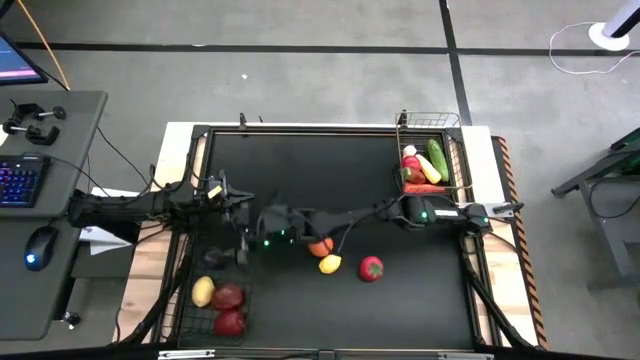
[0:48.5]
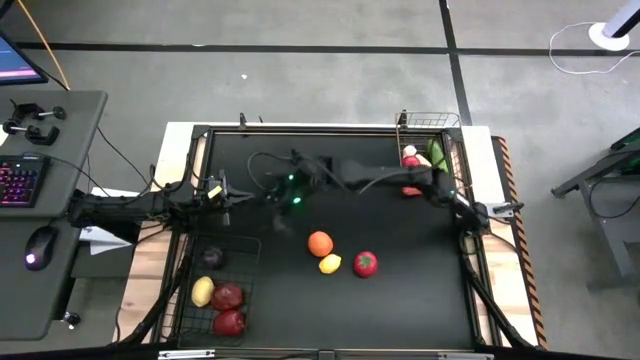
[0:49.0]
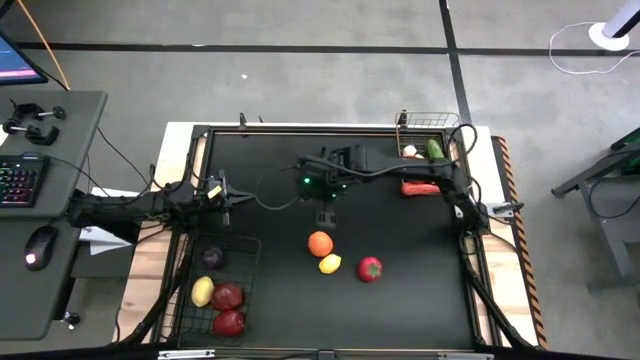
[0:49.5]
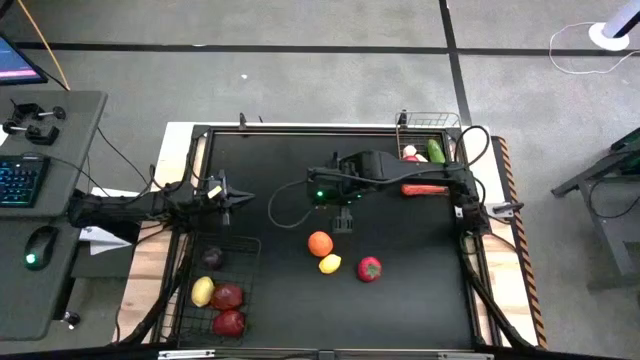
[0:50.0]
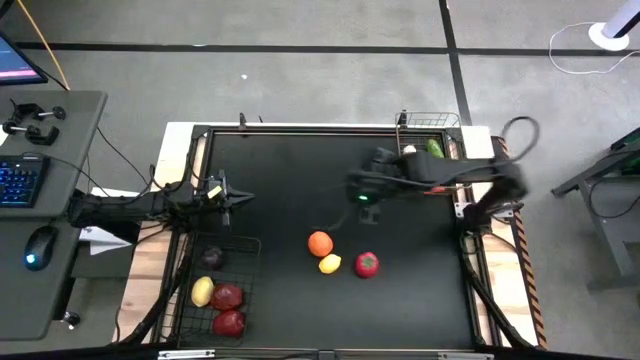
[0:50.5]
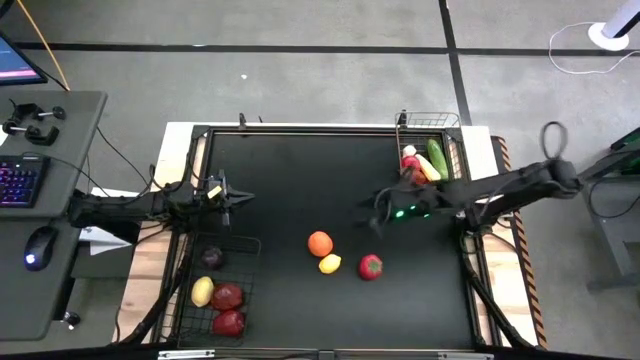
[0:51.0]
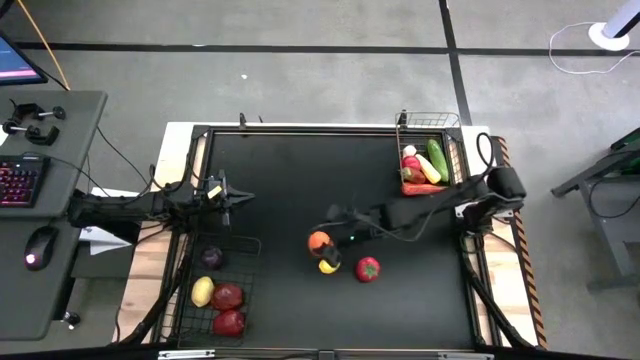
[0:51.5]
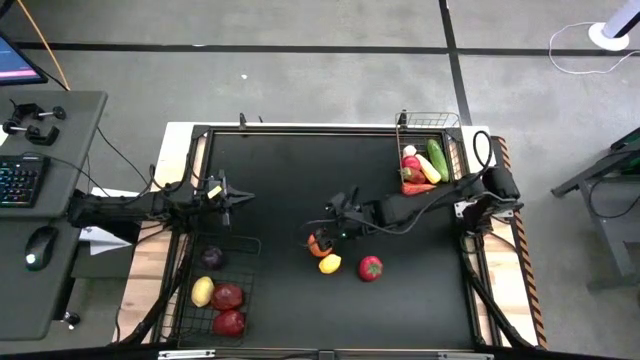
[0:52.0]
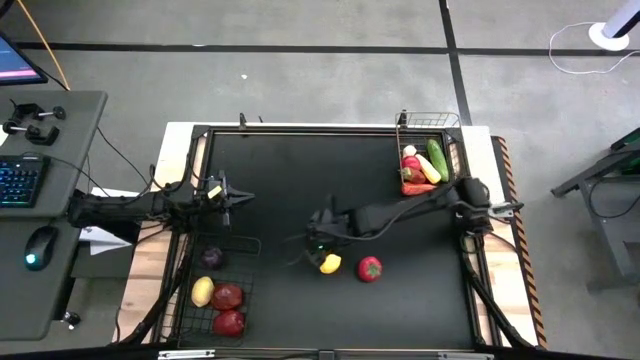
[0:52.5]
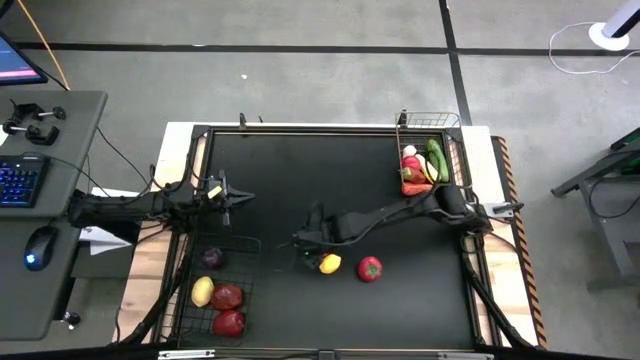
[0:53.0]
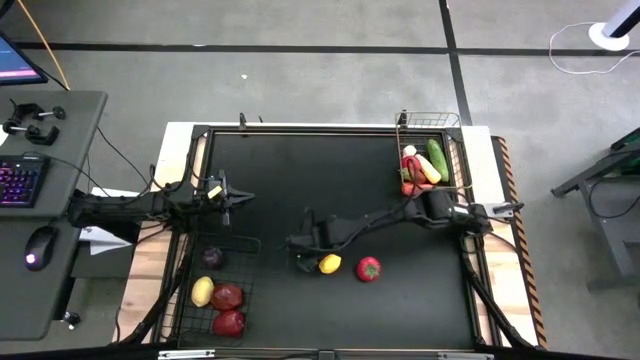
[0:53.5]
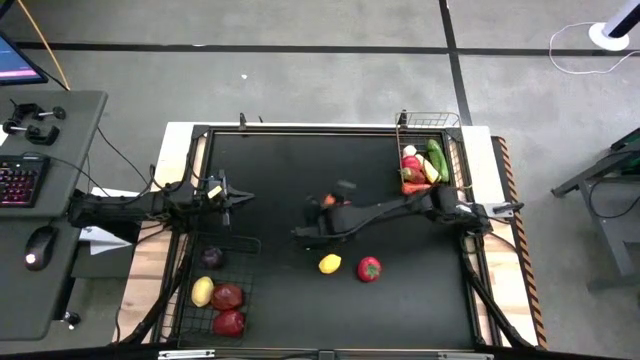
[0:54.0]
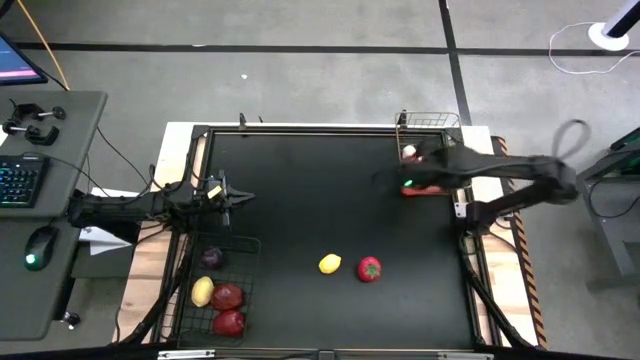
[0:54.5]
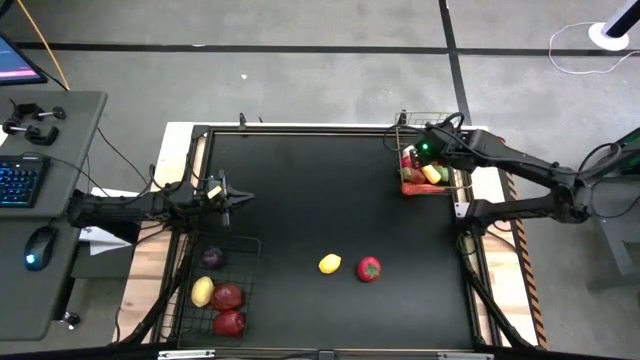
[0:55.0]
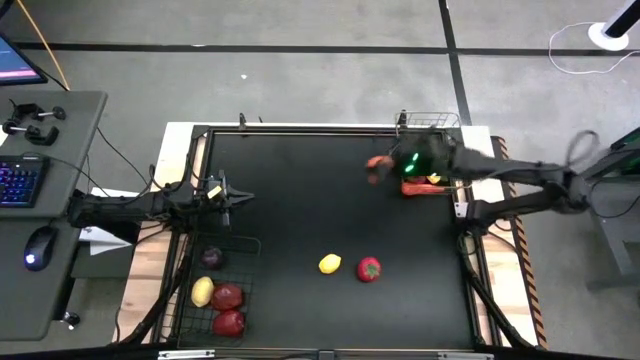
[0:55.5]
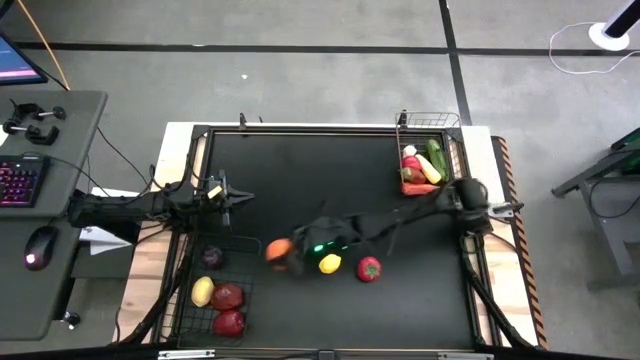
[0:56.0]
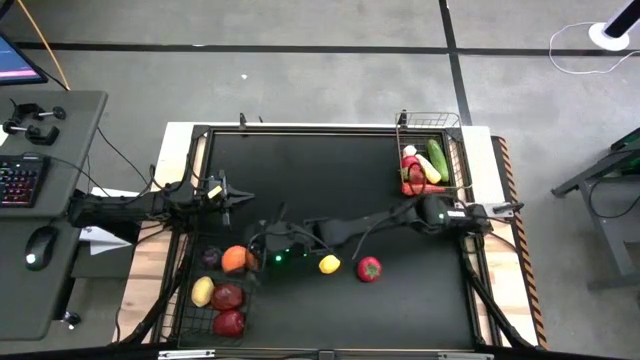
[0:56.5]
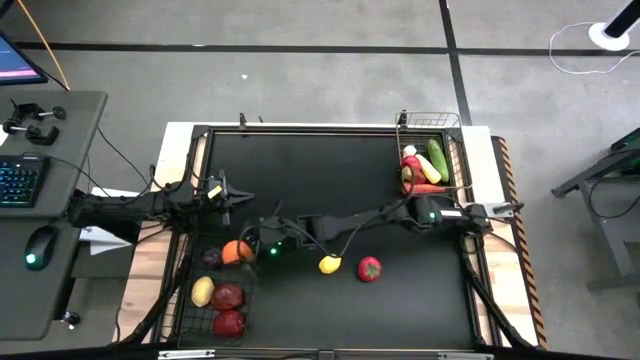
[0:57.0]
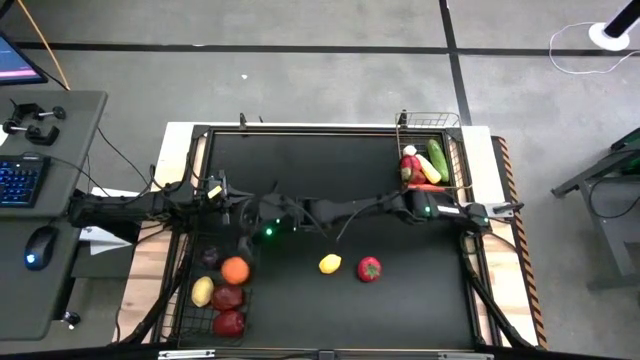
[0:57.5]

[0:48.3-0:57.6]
Task: Sort produce into baskets
Put the orange into the left wire basket

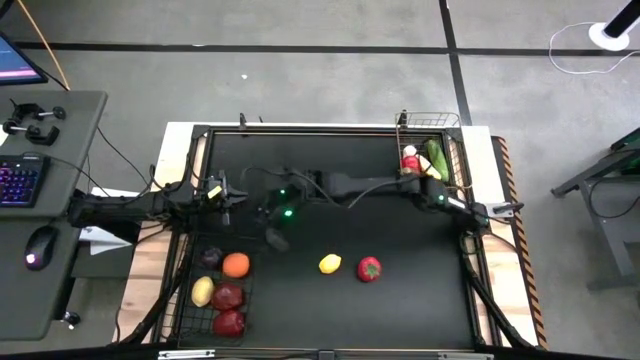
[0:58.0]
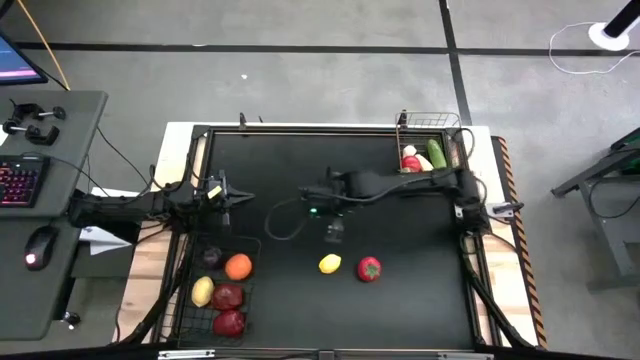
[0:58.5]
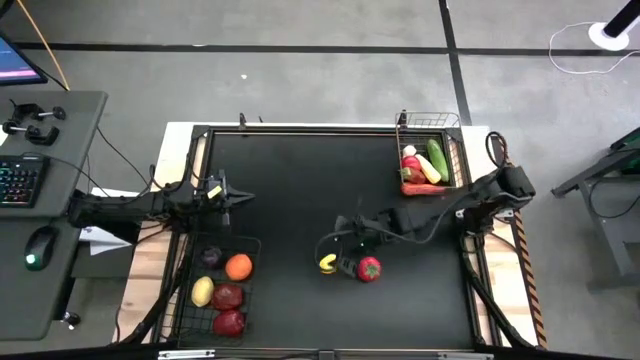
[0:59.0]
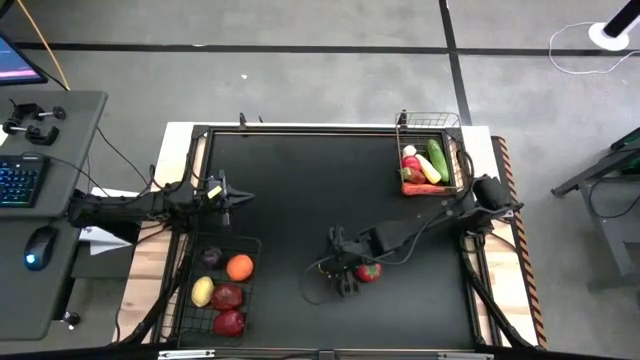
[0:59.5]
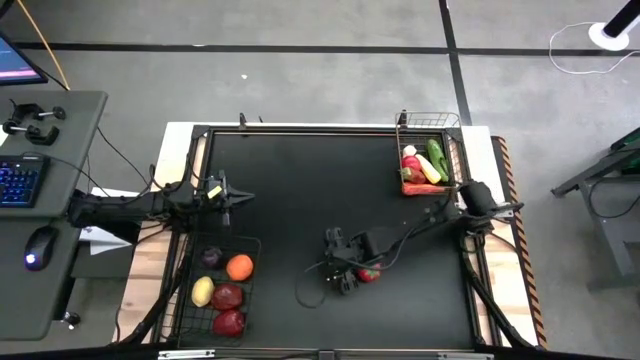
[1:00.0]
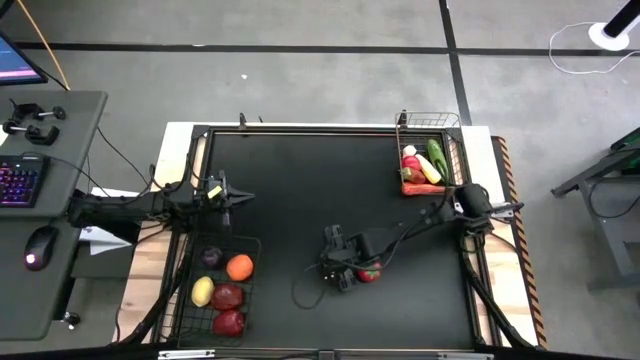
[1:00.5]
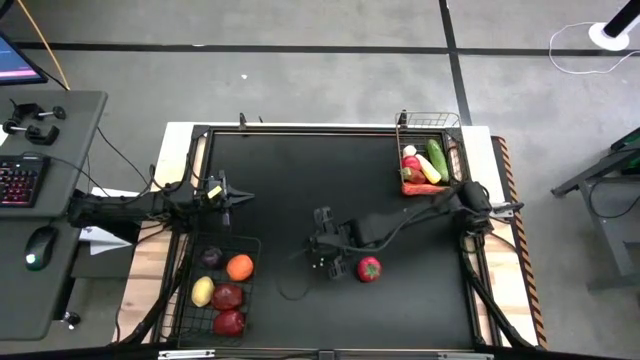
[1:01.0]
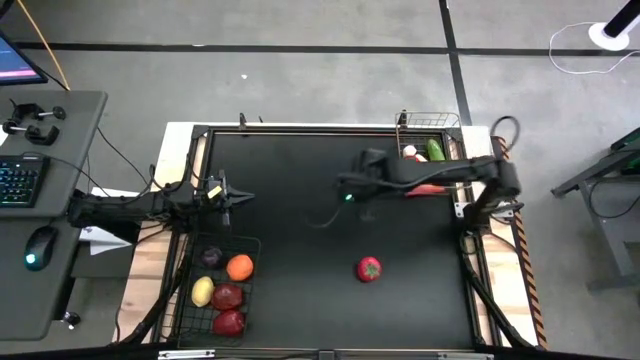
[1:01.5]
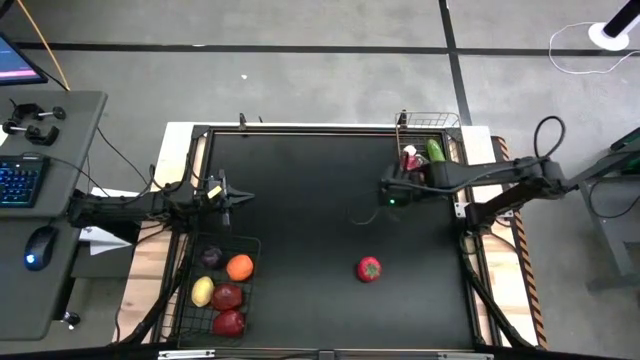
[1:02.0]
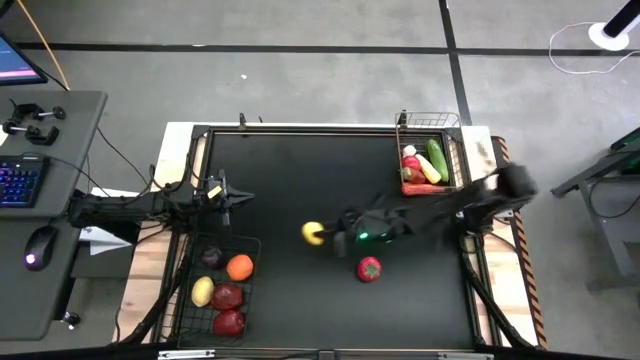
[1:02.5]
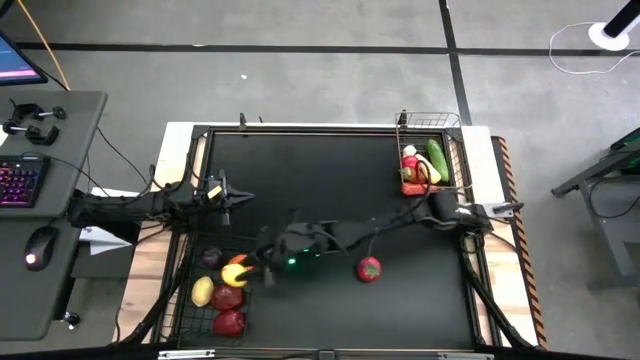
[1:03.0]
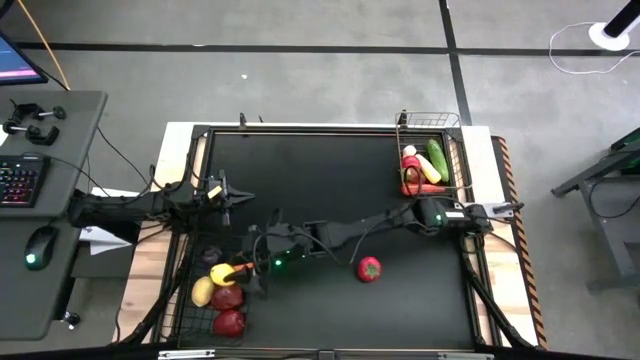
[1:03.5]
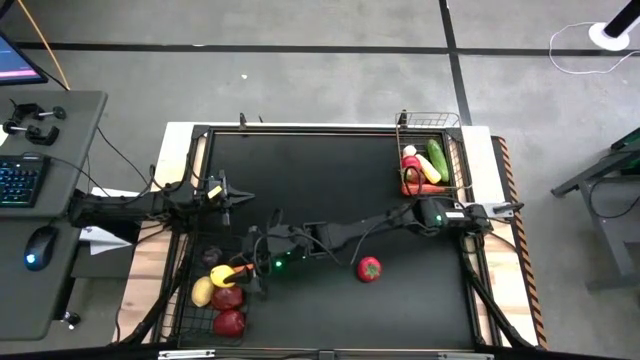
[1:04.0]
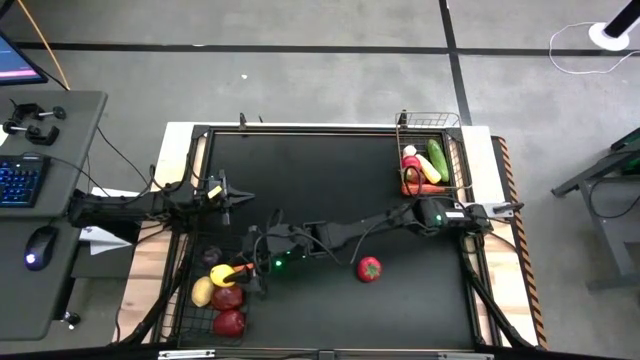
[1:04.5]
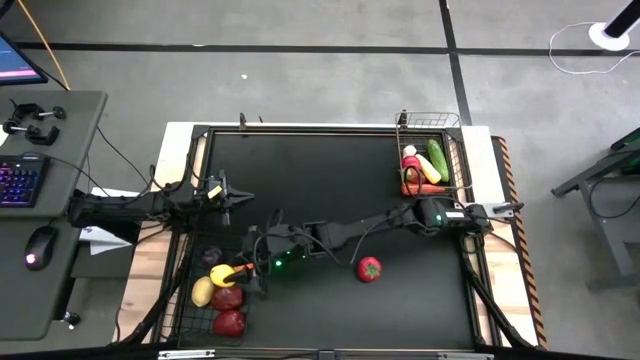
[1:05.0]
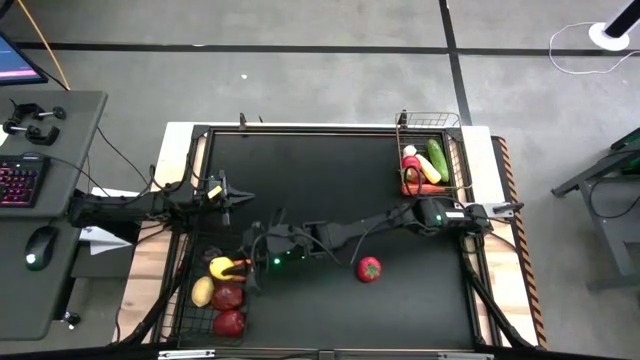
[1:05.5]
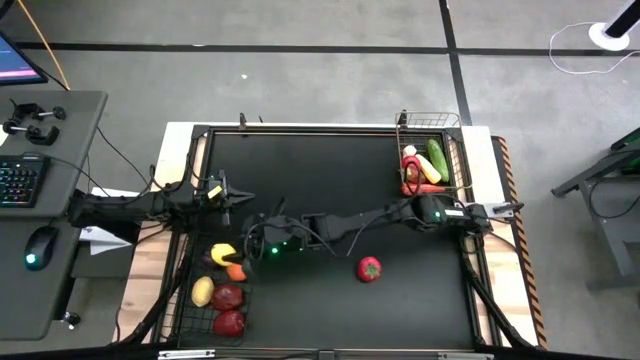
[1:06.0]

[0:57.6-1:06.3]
Put the lemon into the left wire basket

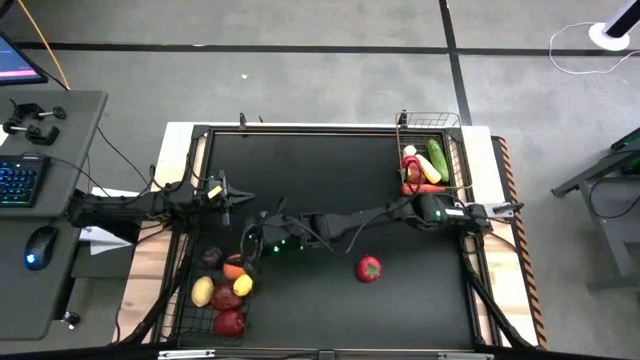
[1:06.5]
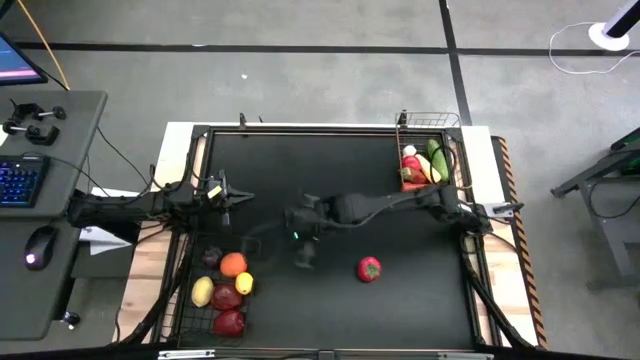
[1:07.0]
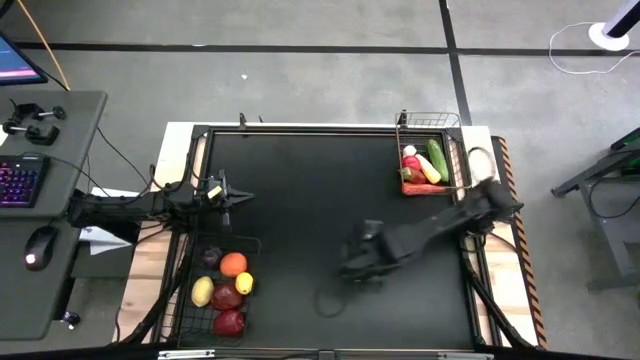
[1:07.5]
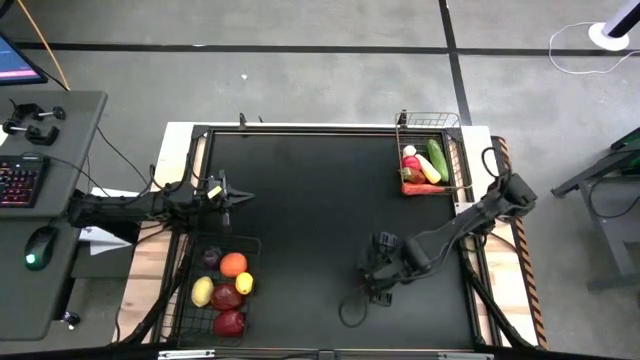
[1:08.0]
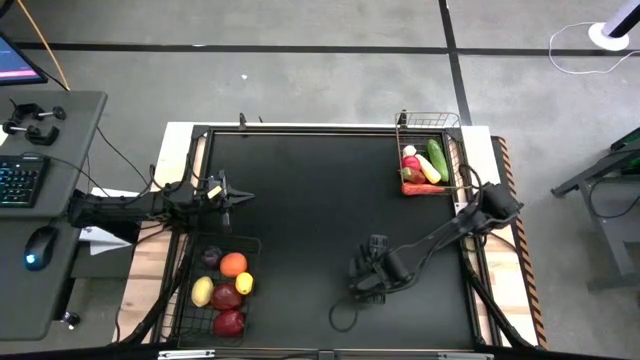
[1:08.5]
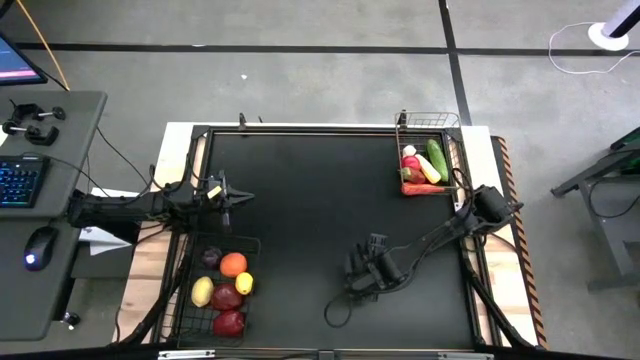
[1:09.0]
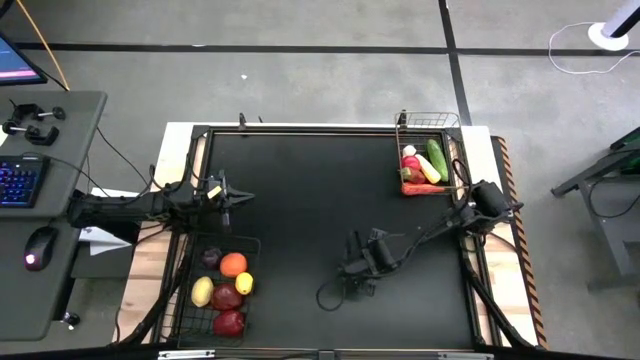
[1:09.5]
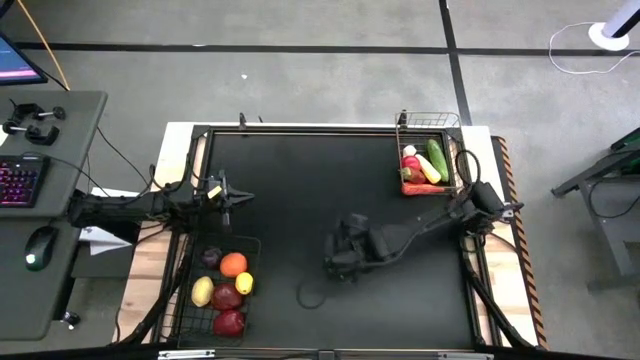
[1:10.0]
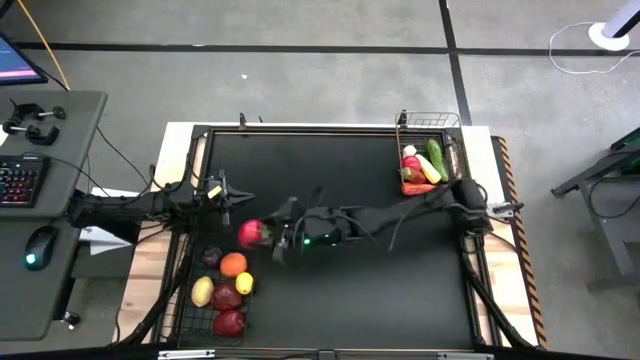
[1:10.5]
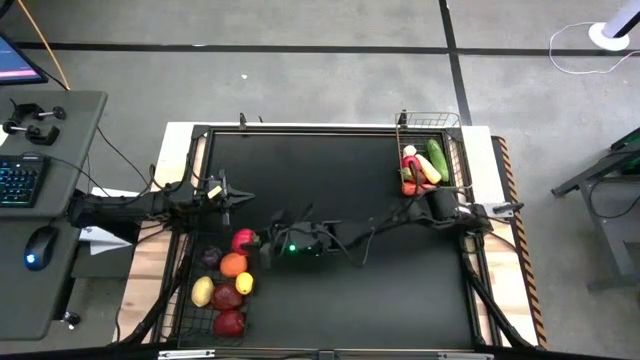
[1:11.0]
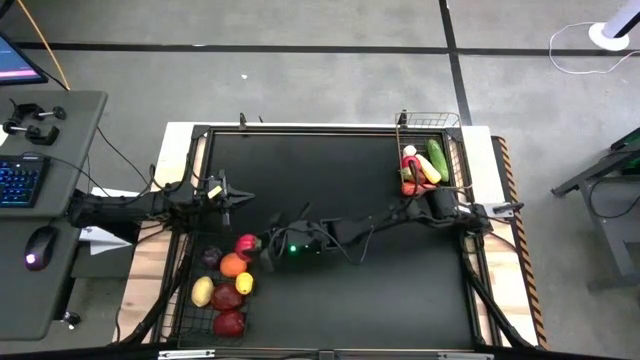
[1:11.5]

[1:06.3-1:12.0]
Put the tomato into the left wire basket
